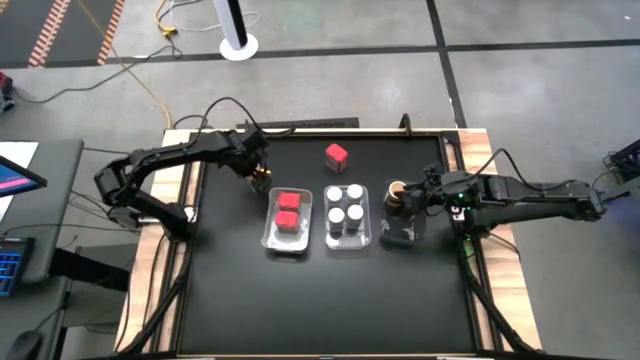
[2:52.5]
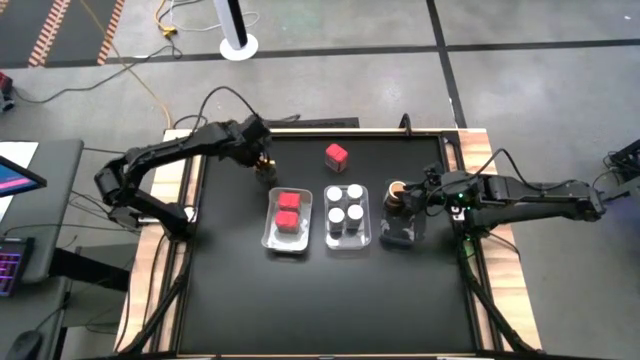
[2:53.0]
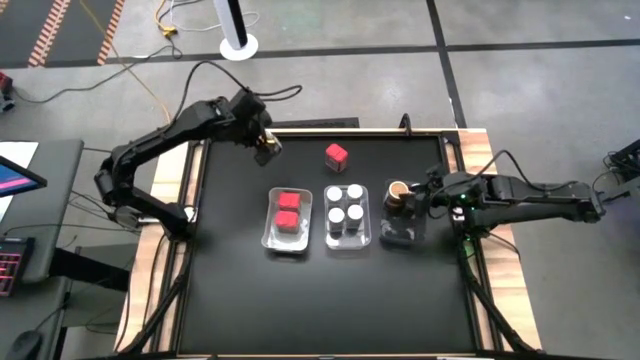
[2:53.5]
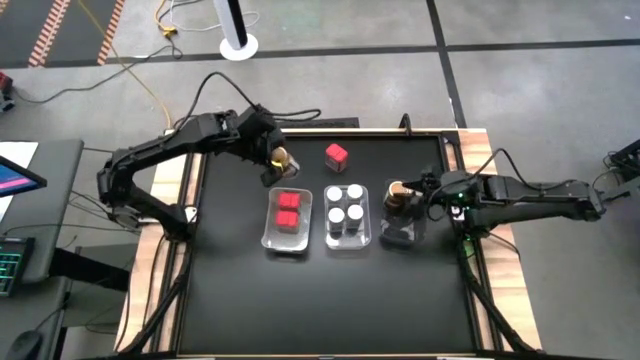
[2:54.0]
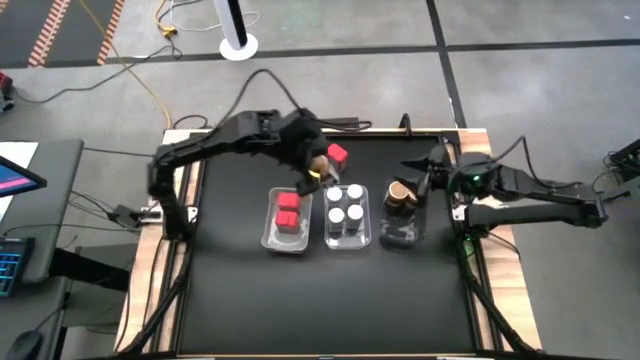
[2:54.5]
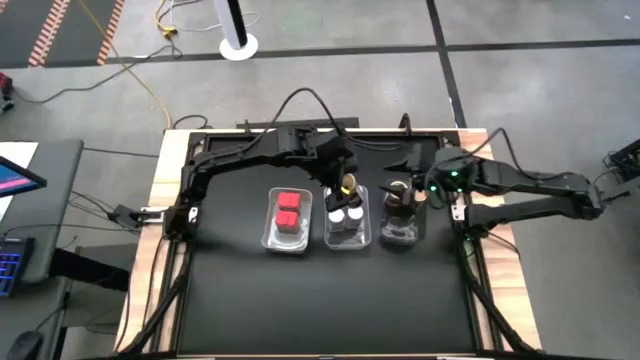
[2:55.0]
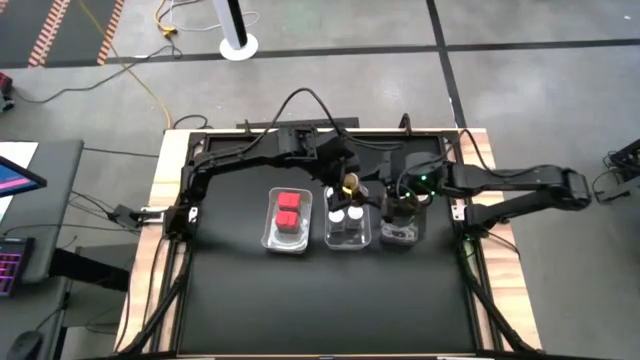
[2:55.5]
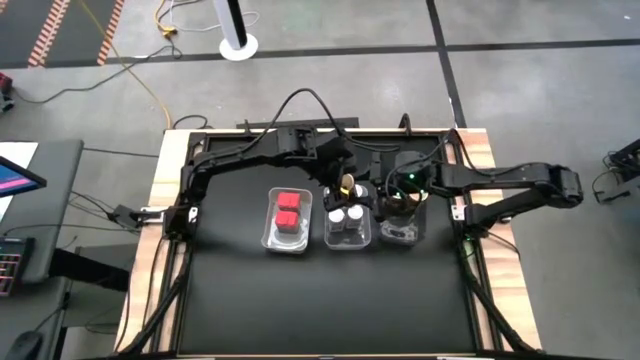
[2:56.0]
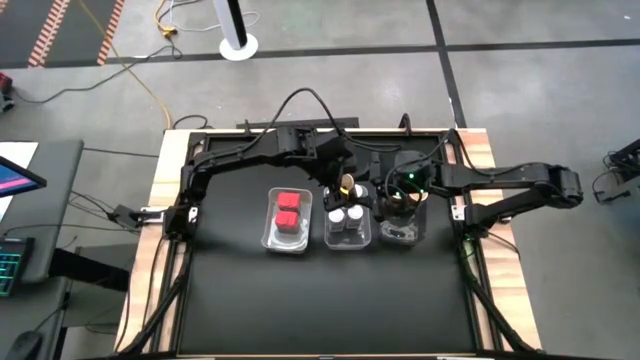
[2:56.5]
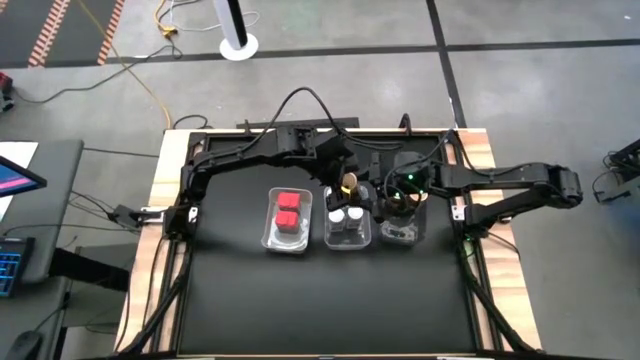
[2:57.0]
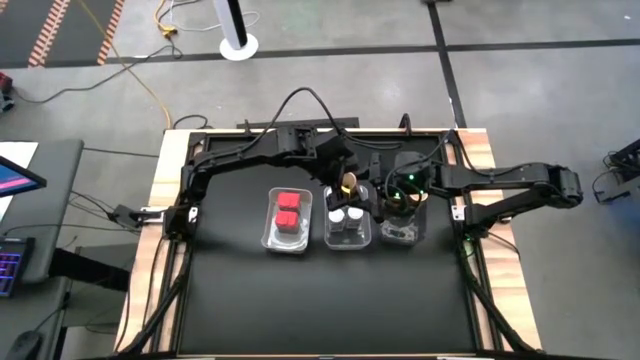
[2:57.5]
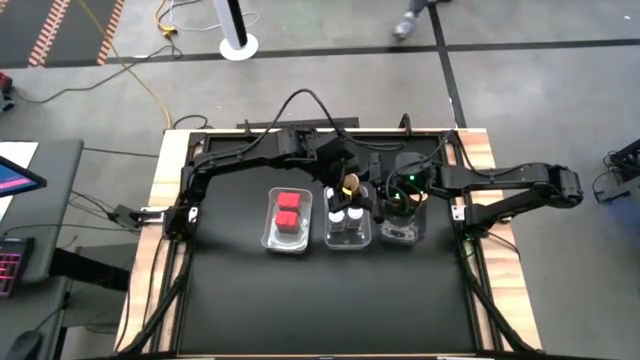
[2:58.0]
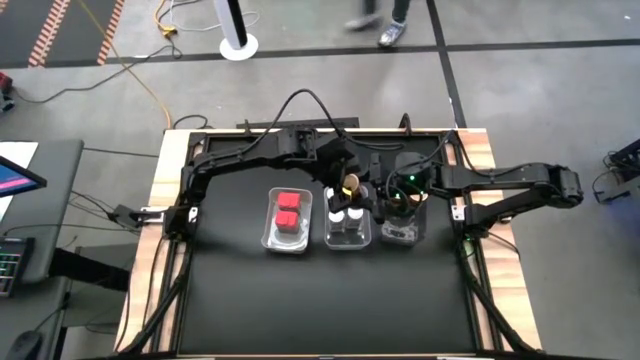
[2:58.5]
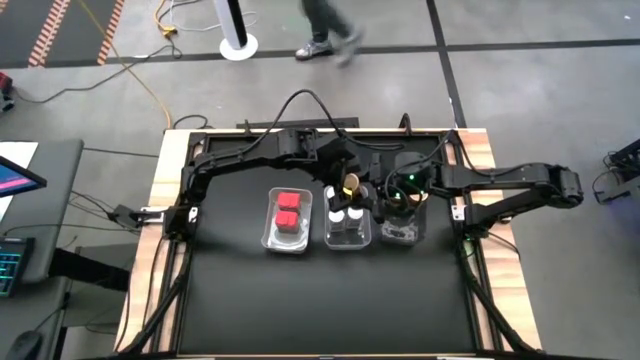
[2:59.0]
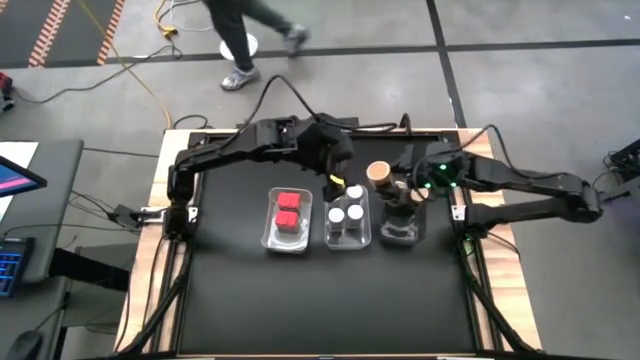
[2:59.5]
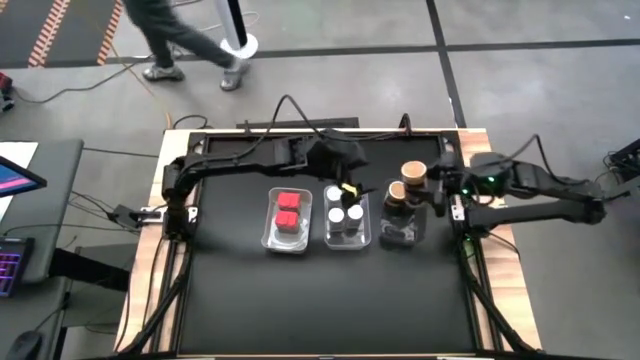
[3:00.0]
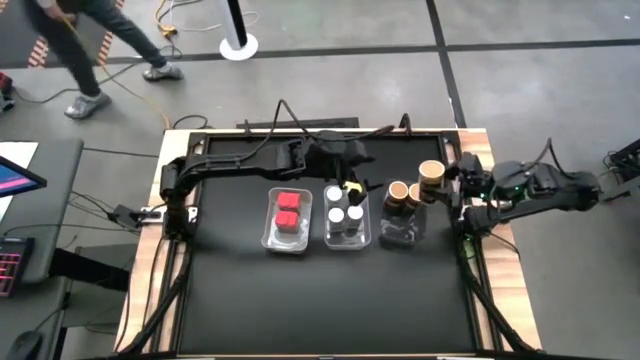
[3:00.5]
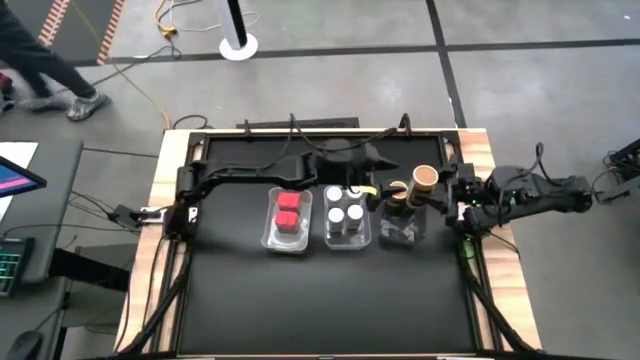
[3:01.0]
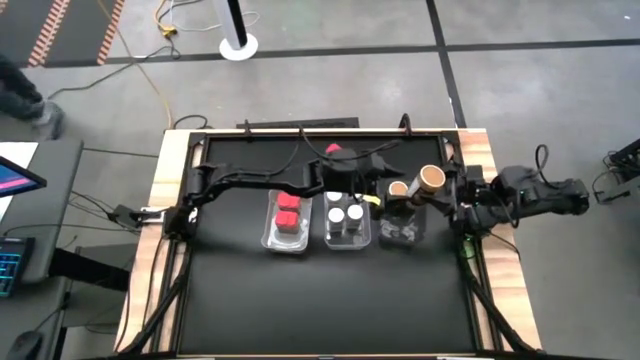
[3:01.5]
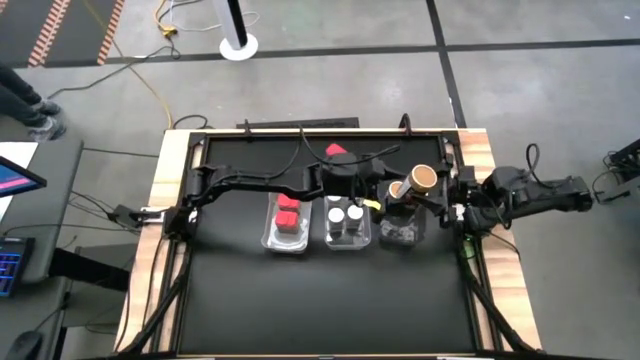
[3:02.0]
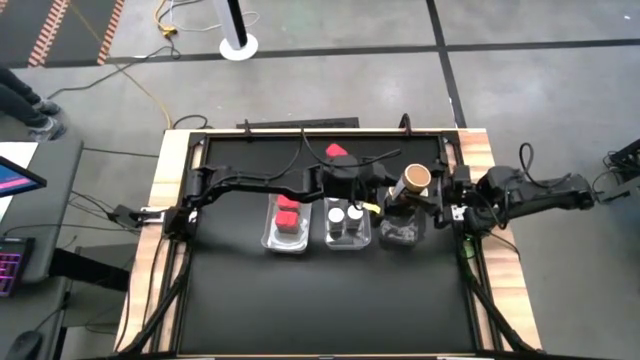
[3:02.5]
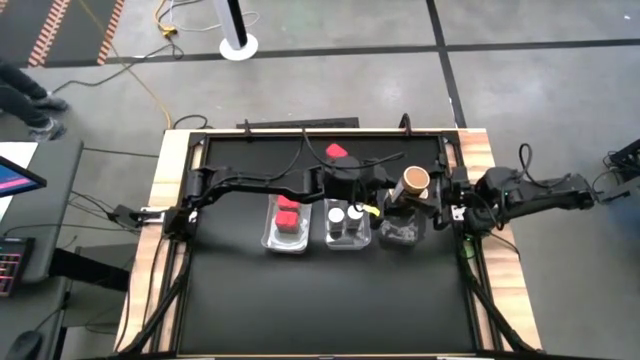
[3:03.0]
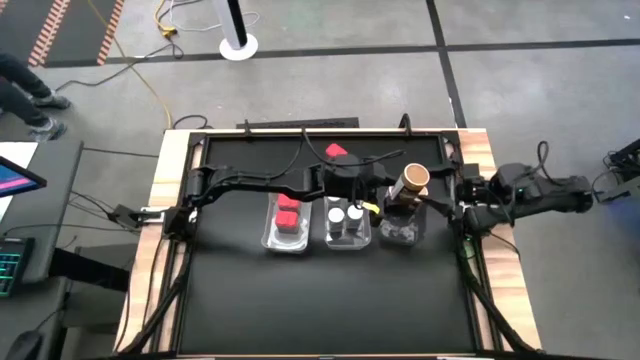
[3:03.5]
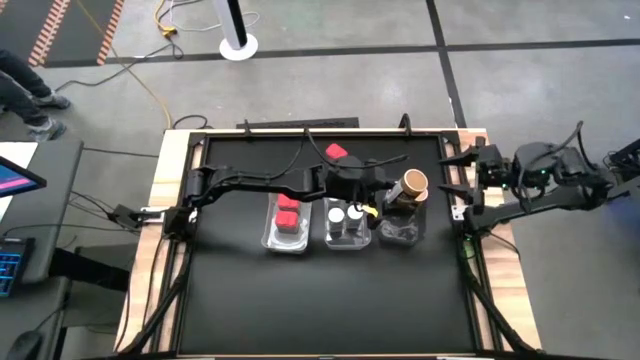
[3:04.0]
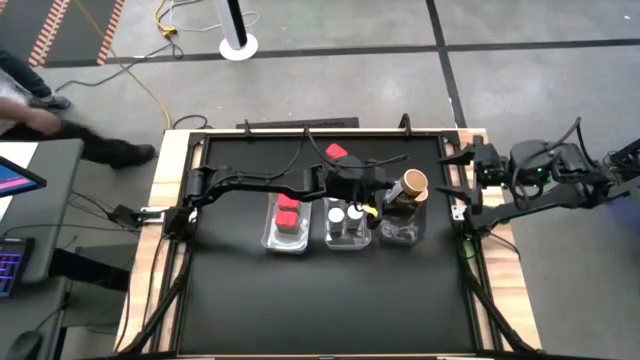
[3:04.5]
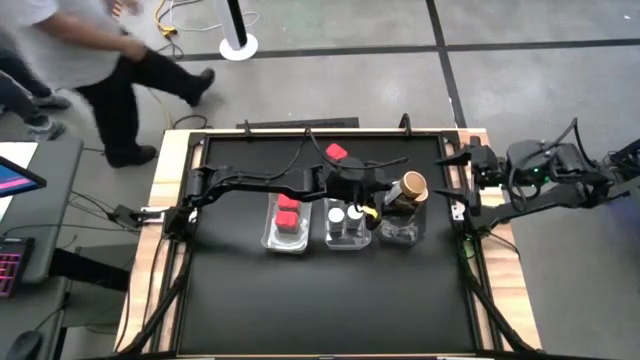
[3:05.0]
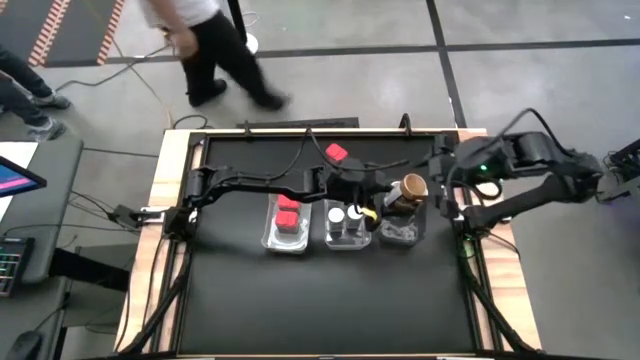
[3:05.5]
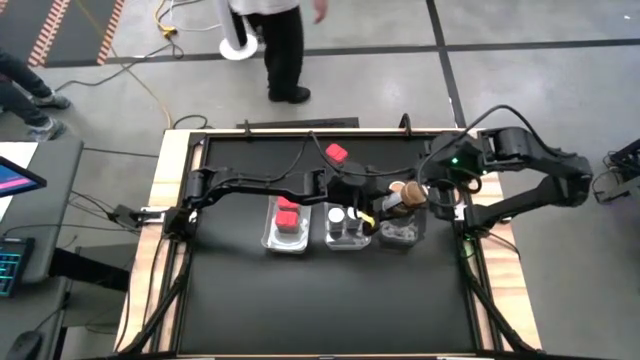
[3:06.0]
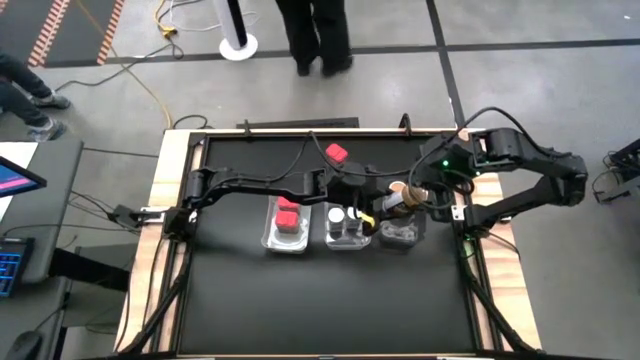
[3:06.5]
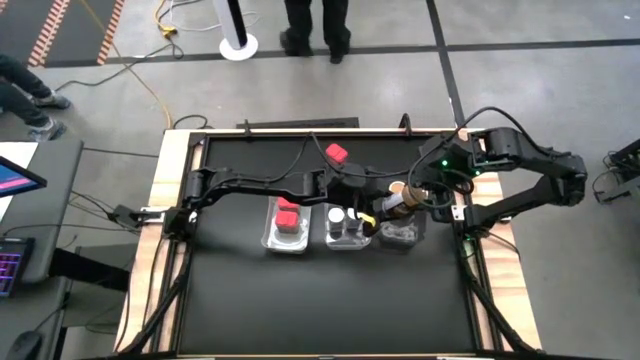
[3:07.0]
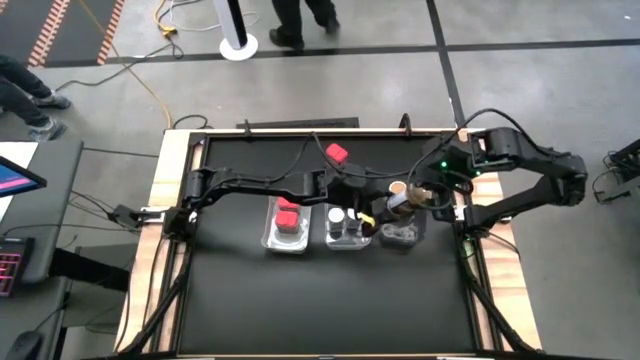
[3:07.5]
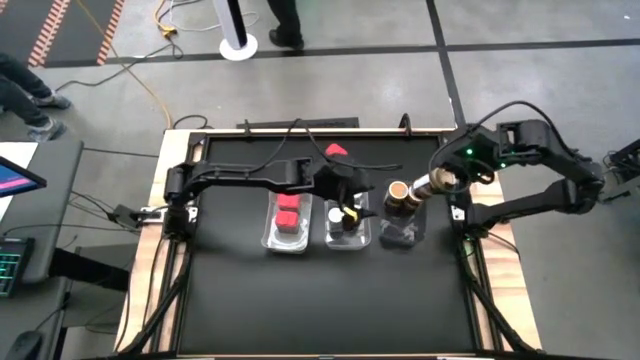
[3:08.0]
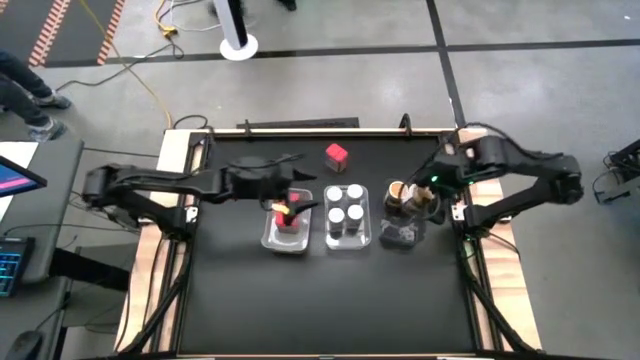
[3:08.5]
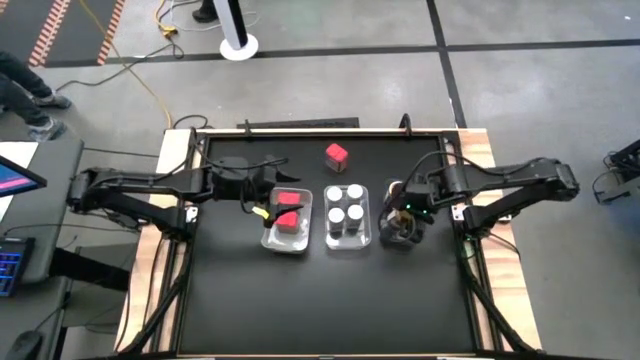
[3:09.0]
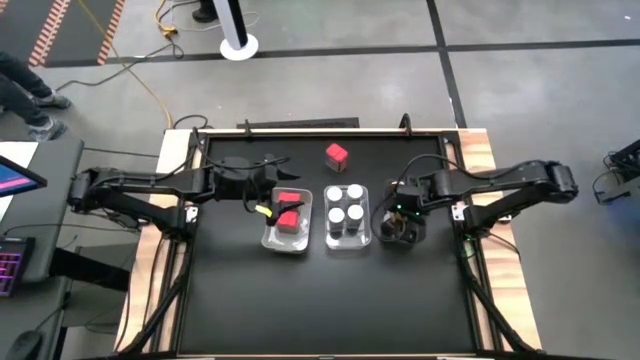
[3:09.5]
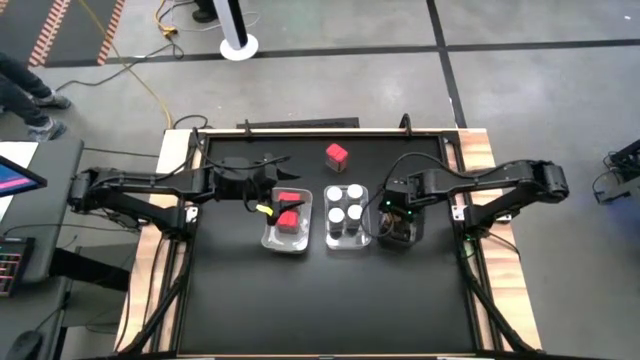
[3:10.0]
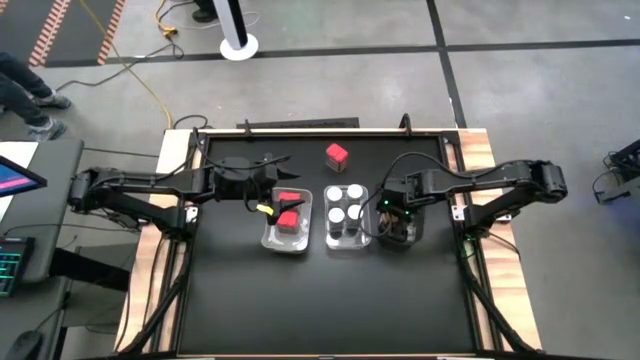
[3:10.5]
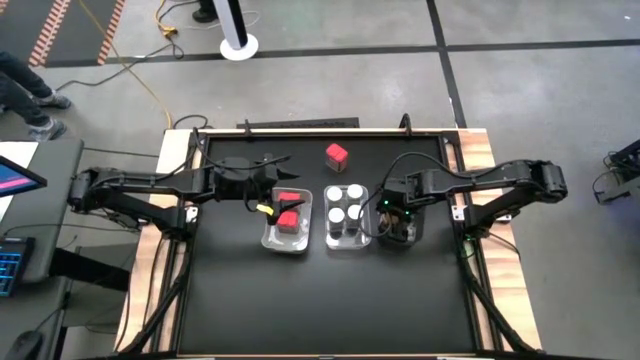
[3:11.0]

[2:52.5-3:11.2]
Task: Sort spices by type
Put the brown seasoning bottle into the black bin

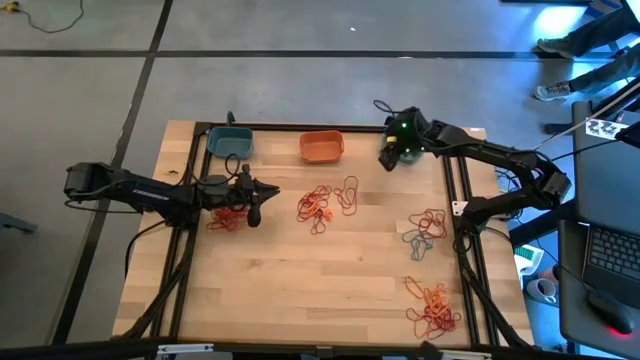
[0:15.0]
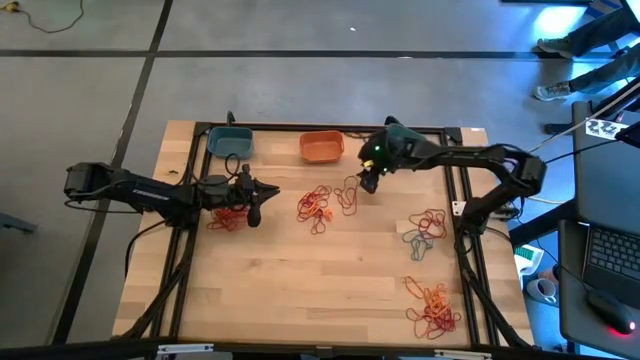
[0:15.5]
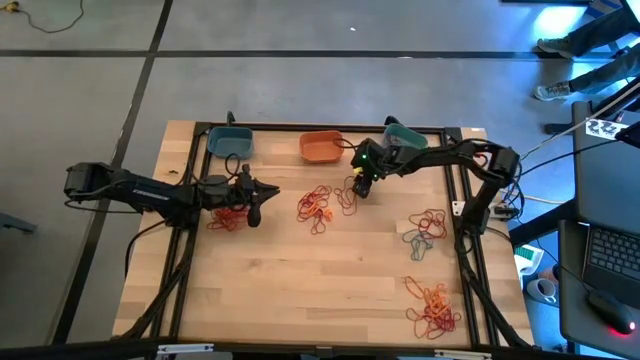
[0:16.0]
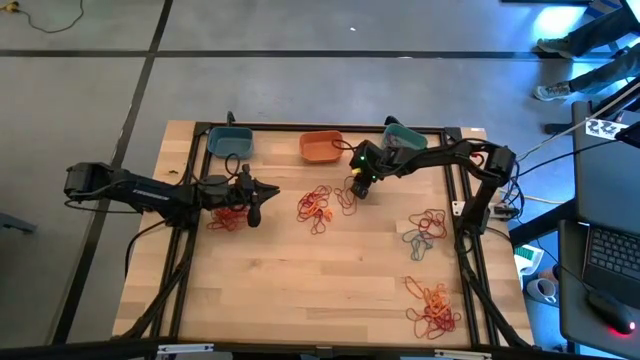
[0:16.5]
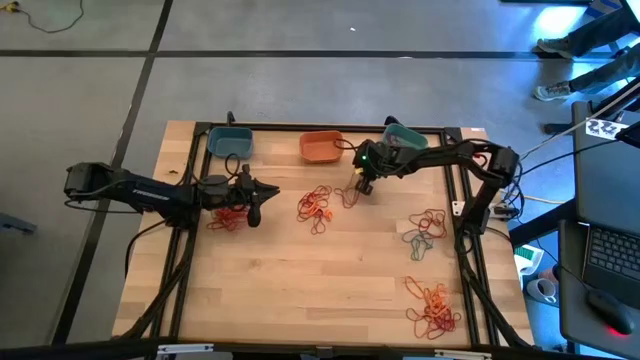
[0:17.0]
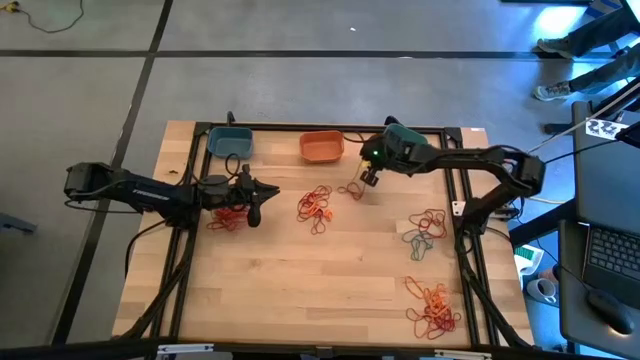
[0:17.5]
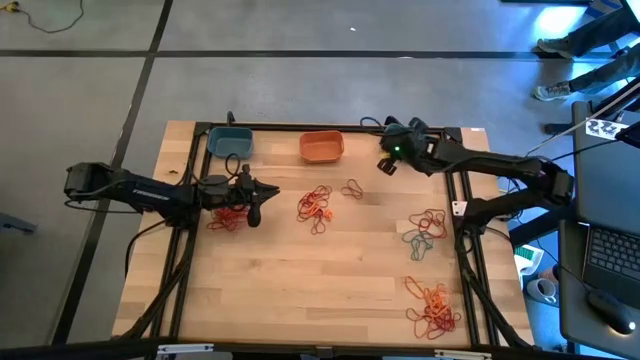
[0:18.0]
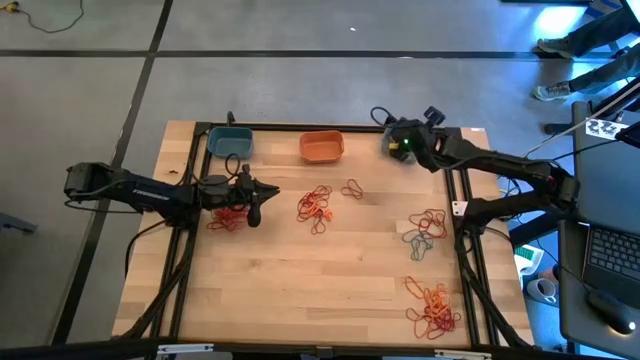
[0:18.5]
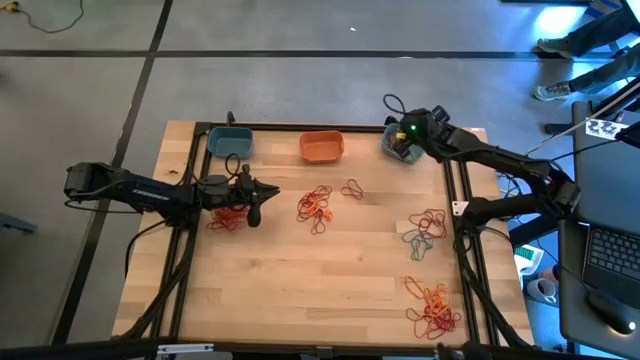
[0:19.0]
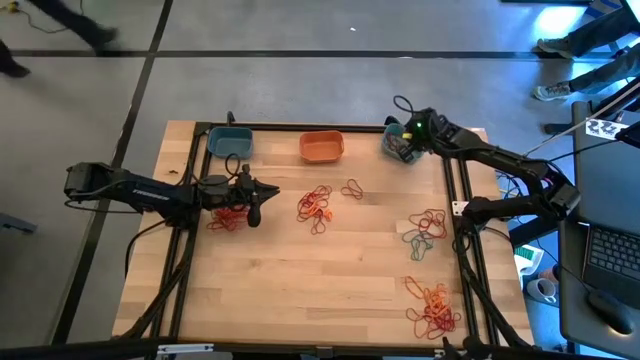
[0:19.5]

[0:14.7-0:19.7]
Task: Sort rubber bands into baskets
Put the red rubber band into the green bin
